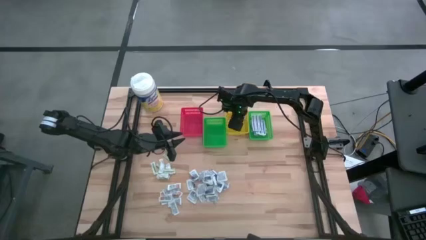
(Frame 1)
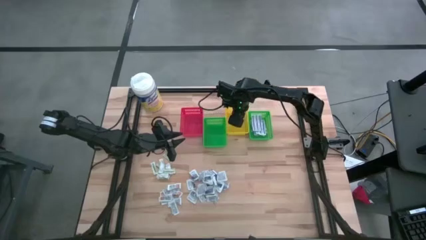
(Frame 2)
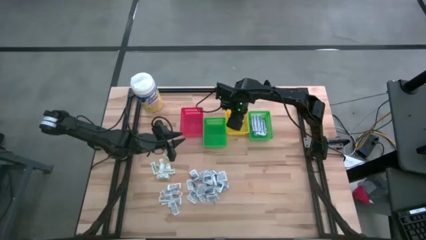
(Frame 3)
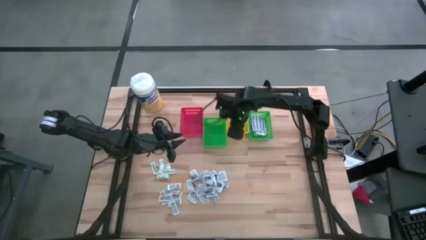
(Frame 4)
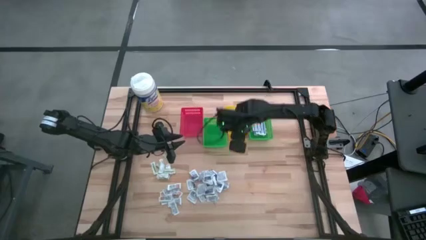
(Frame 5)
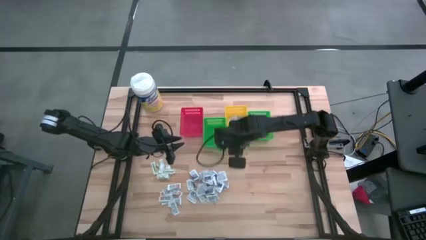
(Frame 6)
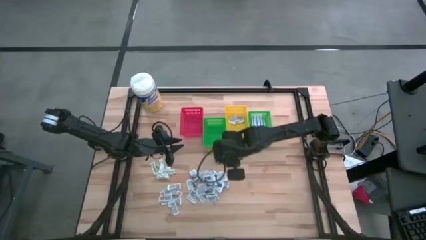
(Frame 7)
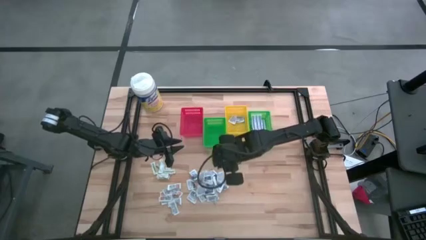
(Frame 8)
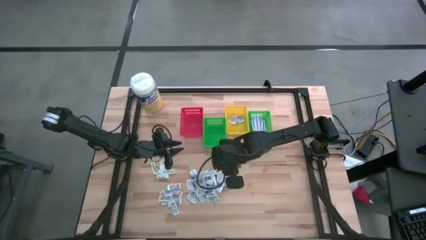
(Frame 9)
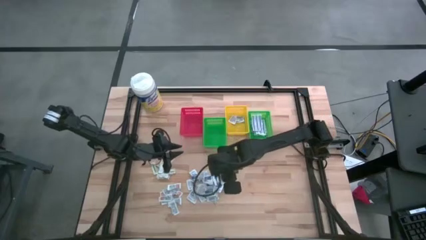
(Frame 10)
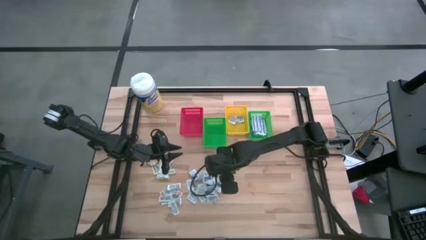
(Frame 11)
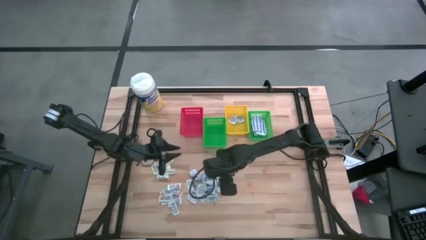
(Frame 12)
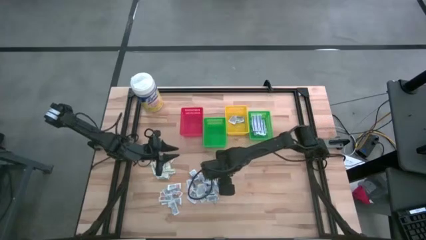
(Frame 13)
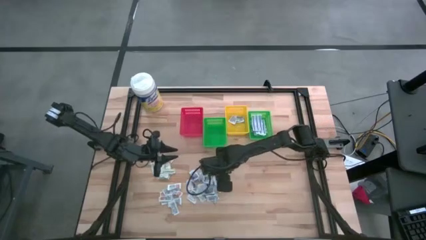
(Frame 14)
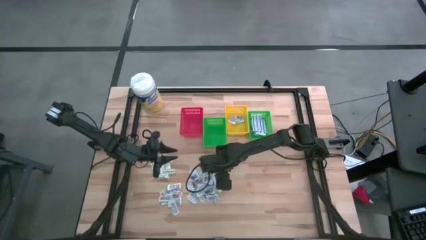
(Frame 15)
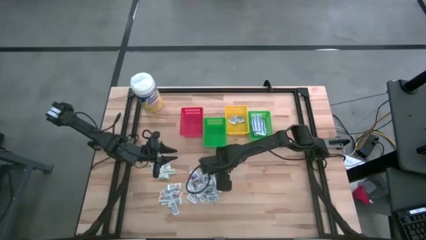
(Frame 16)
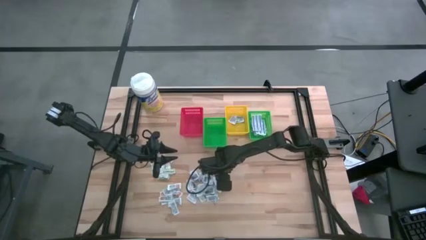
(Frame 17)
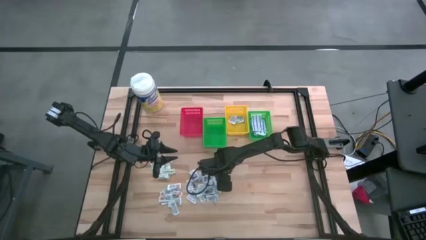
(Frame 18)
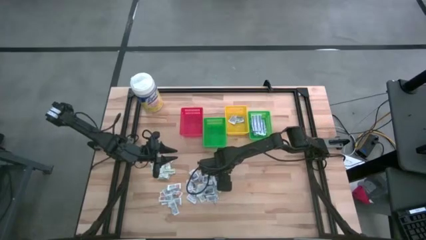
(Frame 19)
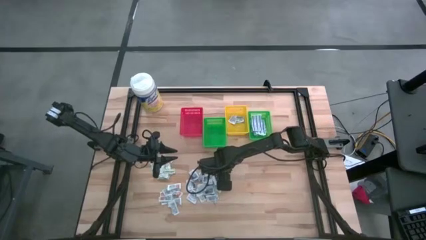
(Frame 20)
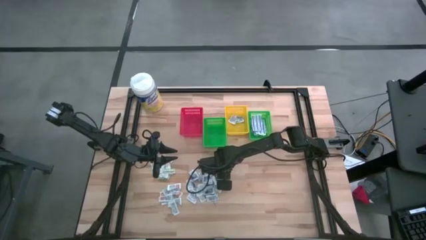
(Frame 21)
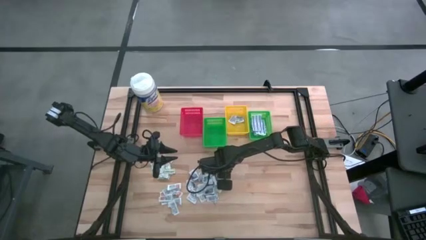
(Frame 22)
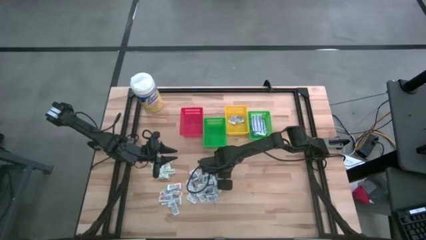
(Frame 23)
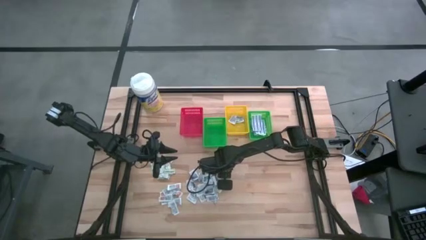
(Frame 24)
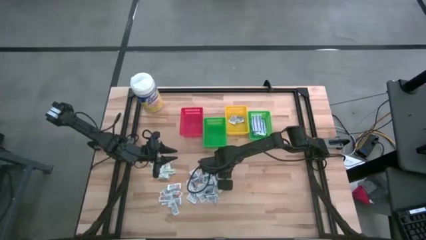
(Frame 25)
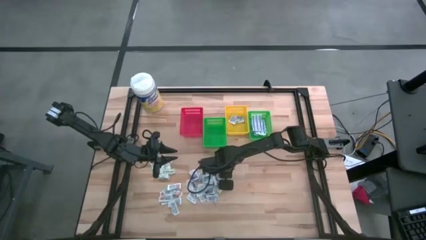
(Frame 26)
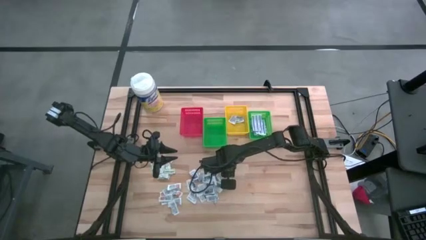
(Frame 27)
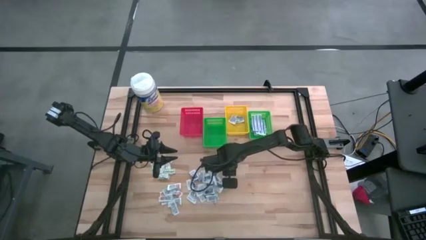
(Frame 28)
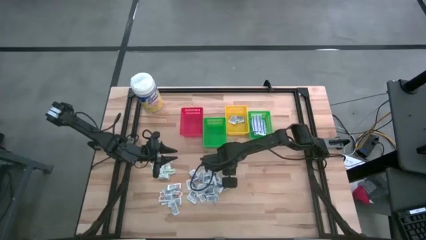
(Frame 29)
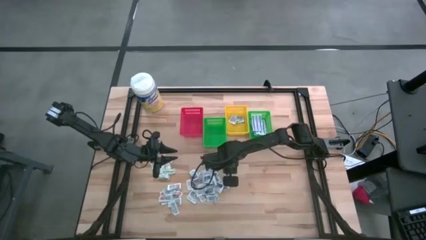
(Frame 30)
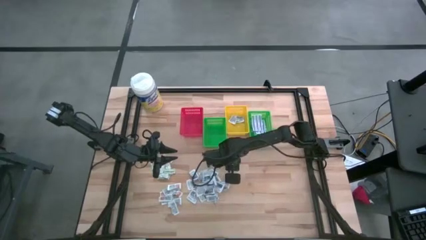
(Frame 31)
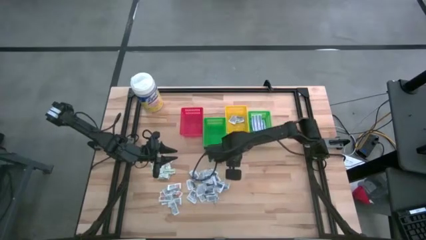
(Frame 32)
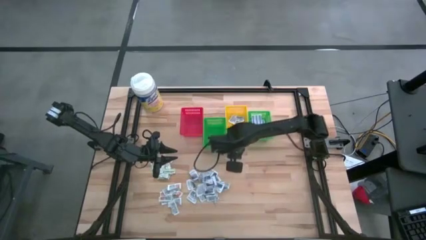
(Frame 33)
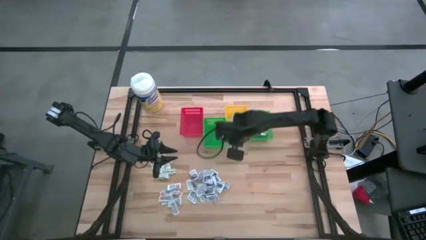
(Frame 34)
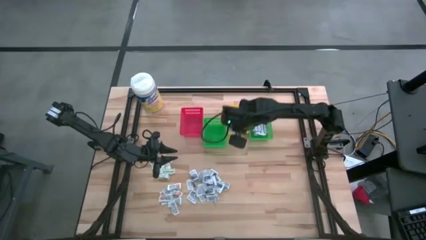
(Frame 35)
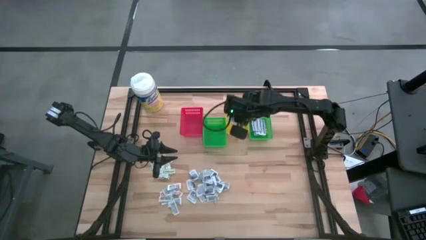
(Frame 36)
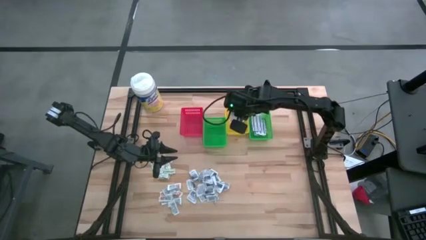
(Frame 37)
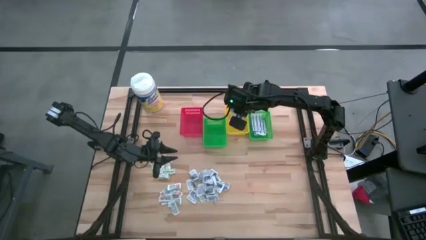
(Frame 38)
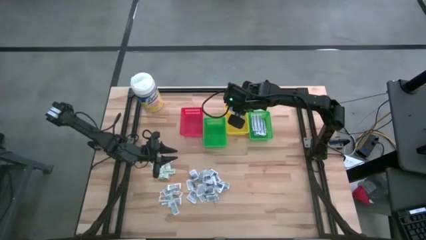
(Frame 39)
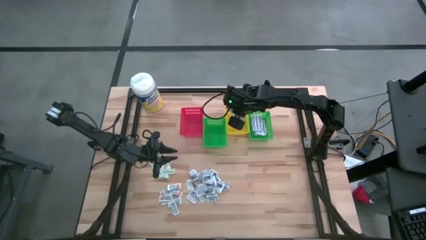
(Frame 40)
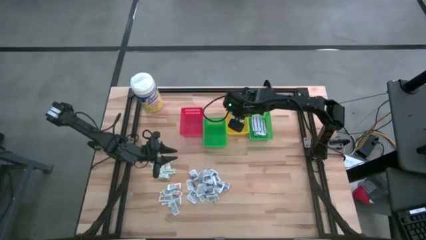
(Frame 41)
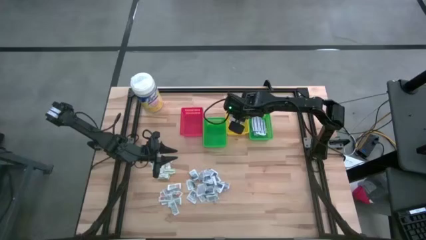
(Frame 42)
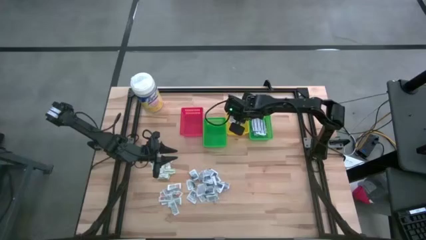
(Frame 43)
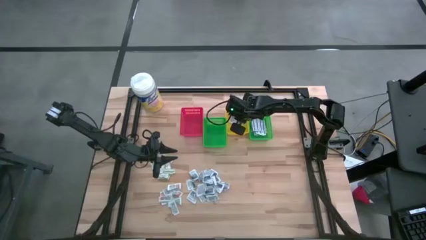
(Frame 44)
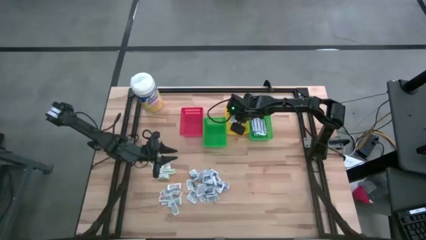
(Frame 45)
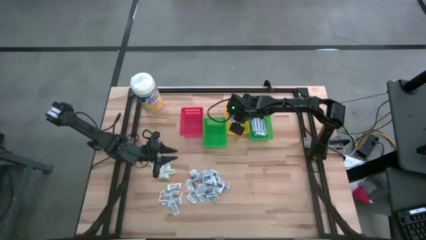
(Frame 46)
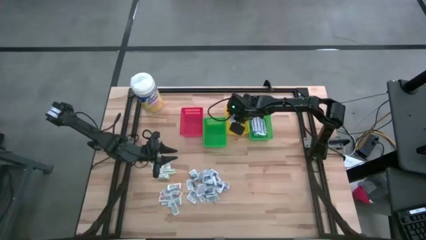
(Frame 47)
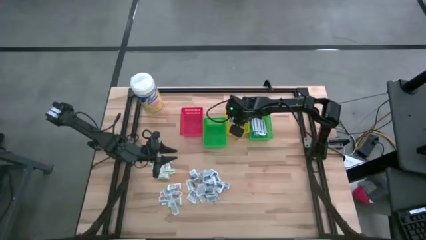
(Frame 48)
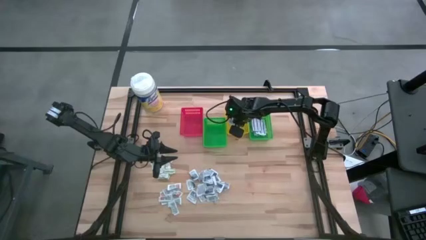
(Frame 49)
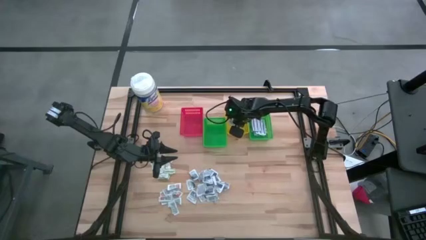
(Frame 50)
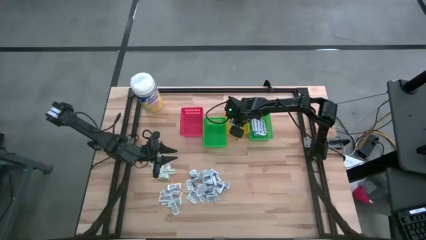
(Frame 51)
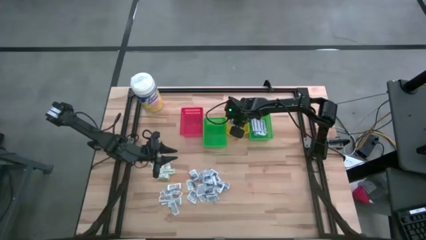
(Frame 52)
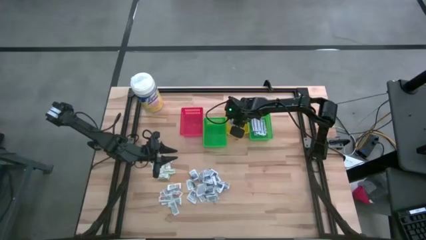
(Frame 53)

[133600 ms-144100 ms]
Task: Pick & Place First Aid Supplies
Put the alcohol pad into the yellow basket

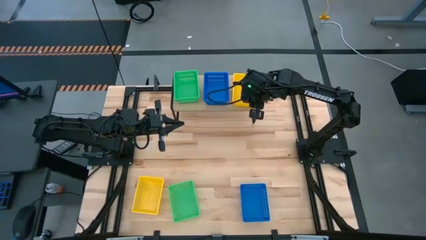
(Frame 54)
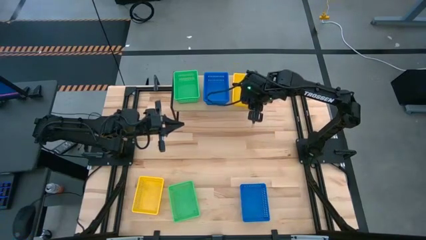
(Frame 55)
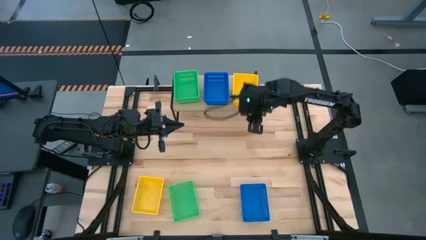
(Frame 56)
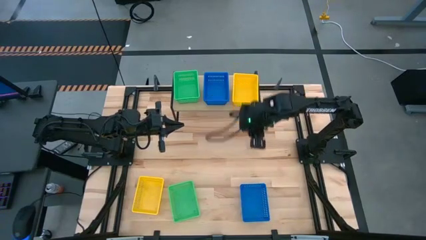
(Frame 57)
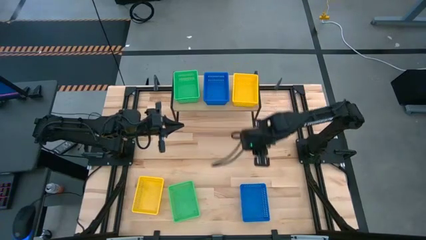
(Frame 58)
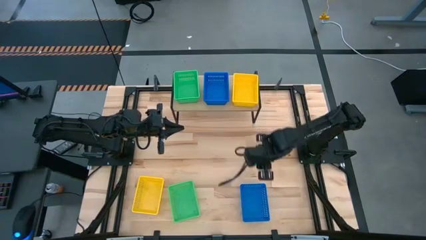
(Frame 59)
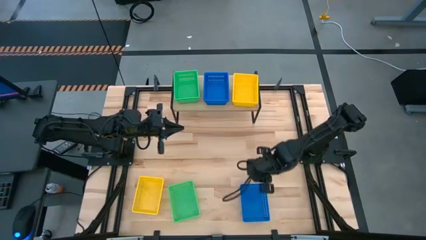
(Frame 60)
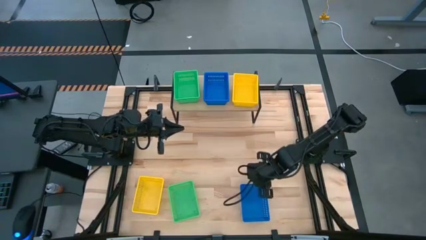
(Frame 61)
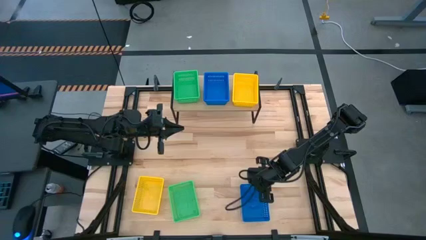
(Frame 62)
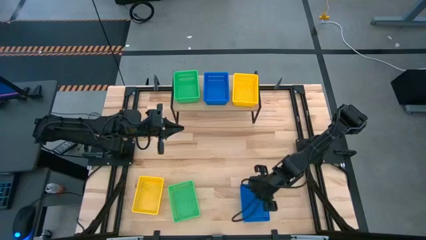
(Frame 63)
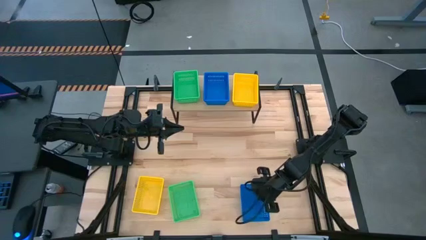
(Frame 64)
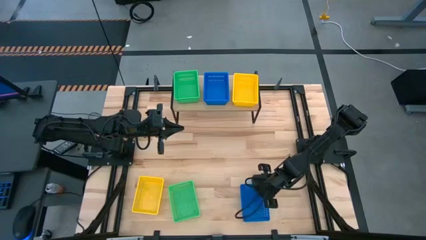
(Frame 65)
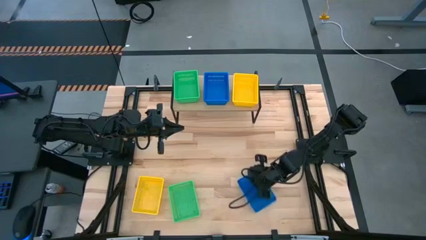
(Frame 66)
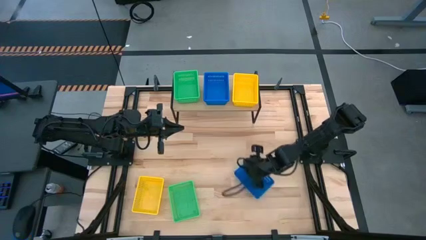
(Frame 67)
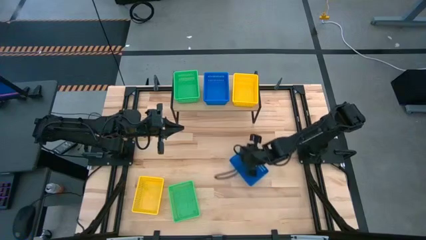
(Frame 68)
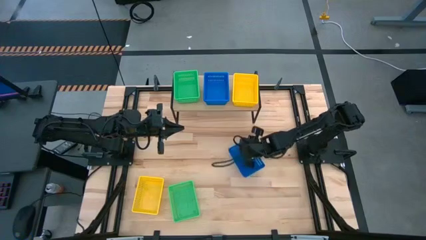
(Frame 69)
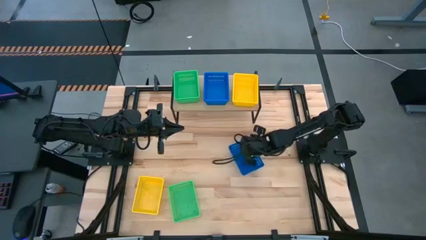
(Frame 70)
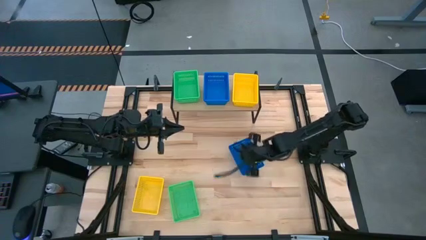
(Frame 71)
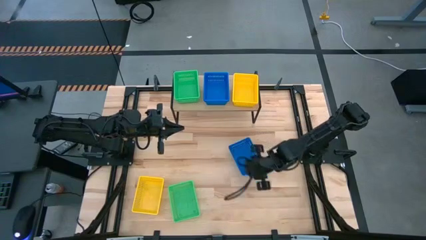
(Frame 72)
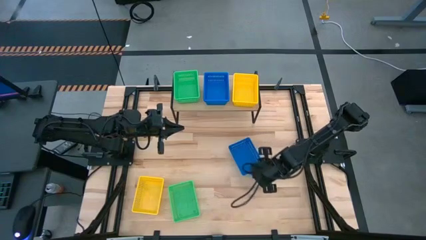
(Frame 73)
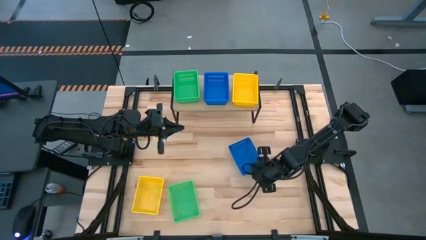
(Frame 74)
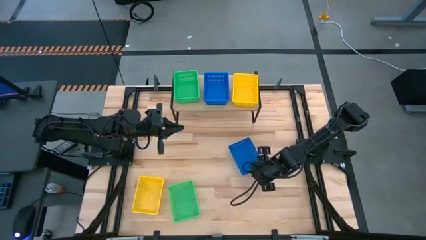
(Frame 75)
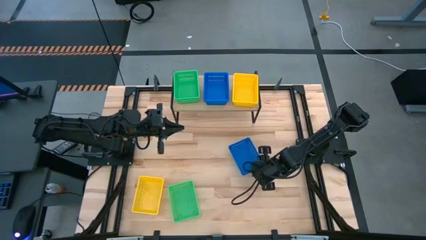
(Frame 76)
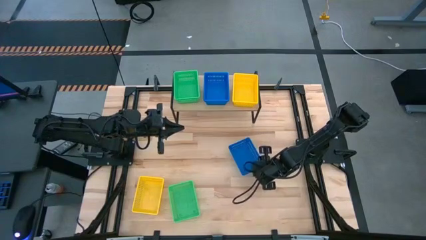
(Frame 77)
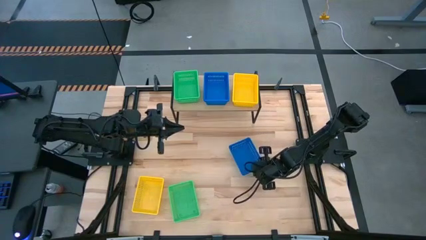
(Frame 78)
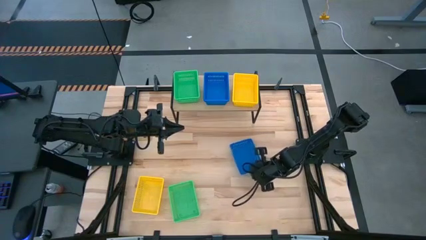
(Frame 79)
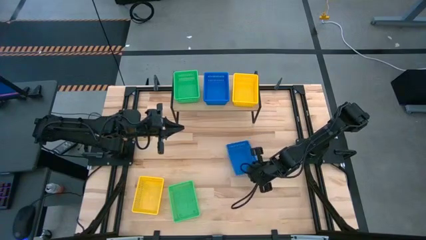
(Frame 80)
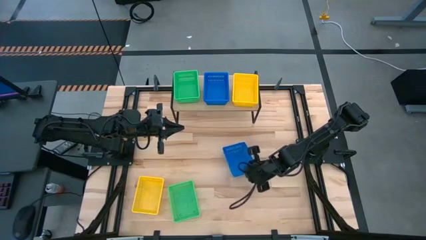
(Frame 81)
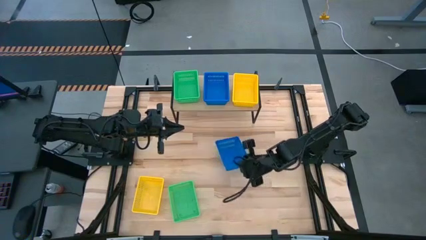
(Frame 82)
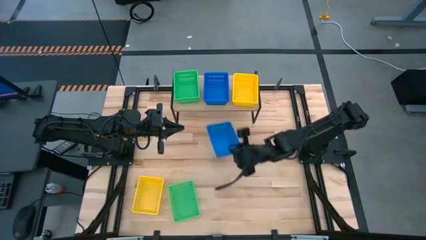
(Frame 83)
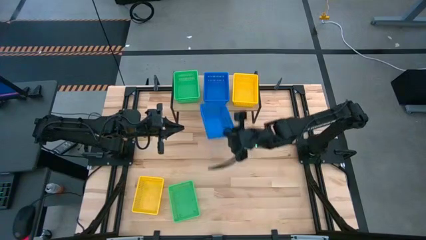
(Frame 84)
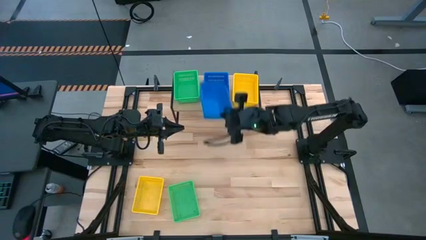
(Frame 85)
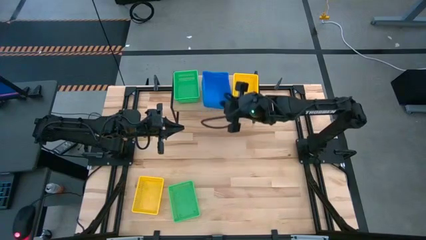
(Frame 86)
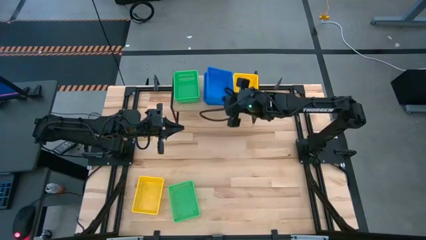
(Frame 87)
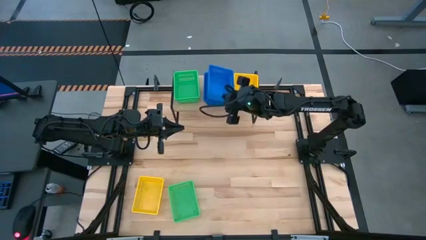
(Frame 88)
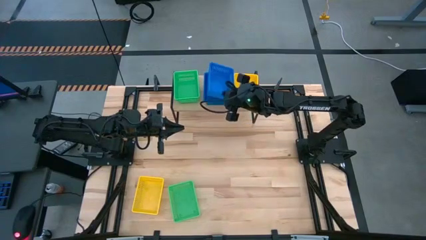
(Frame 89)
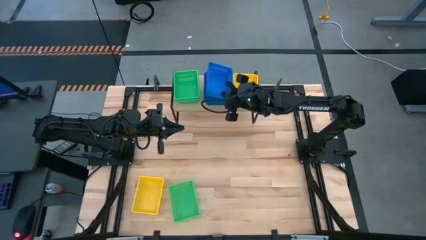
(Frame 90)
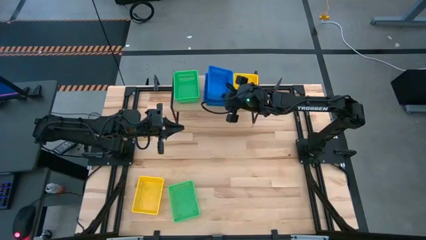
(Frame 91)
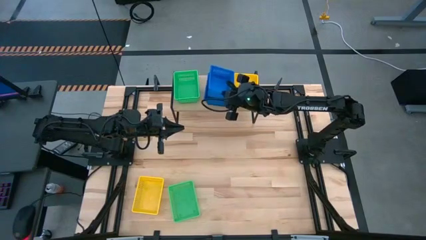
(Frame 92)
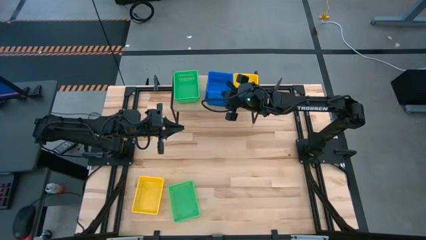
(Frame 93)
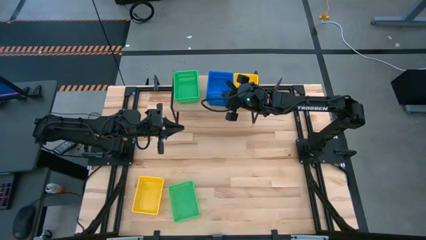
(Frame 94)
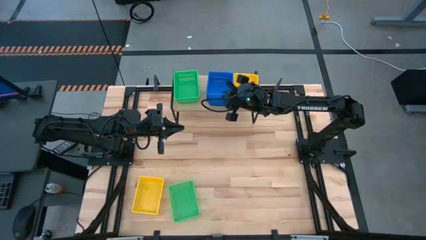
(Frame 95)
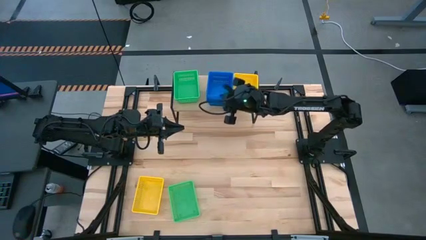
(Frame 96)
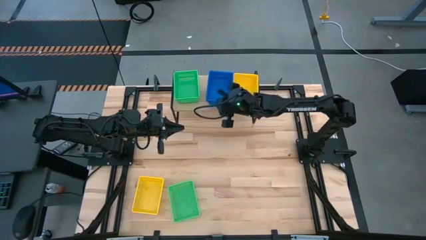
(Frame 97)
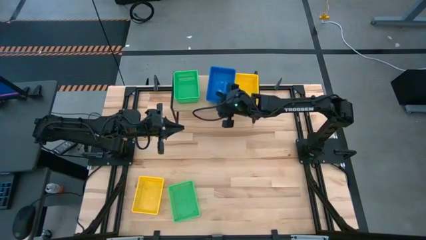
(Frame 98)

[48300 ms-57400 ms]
Task: Stack baskets on shelf by color
Stack the blue bin on top of the blue bin on the shelf
